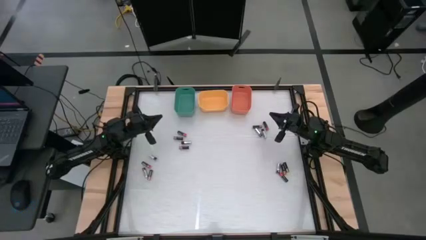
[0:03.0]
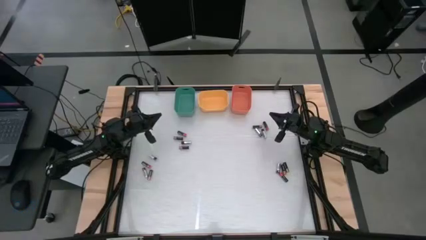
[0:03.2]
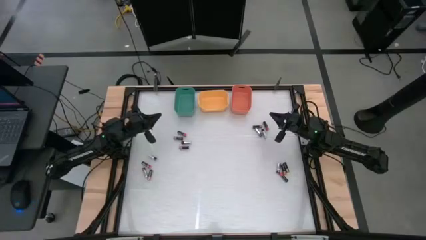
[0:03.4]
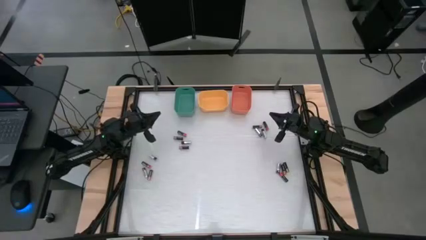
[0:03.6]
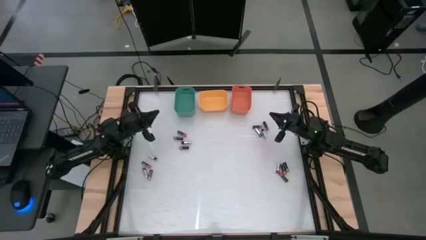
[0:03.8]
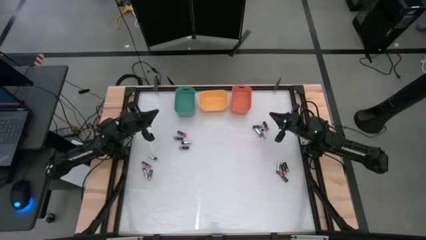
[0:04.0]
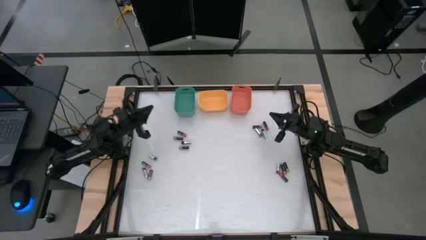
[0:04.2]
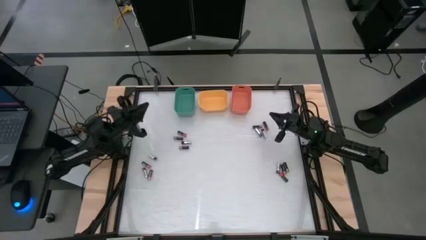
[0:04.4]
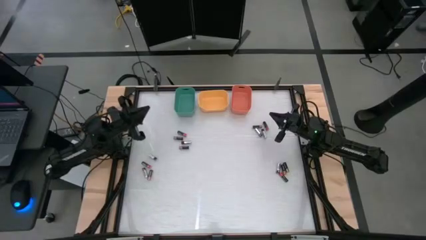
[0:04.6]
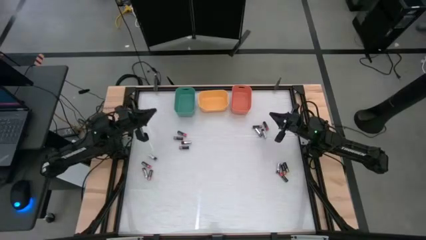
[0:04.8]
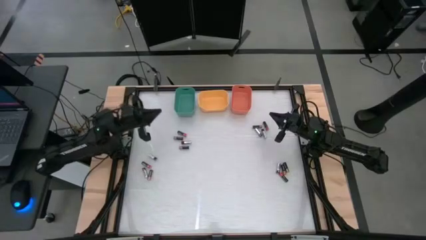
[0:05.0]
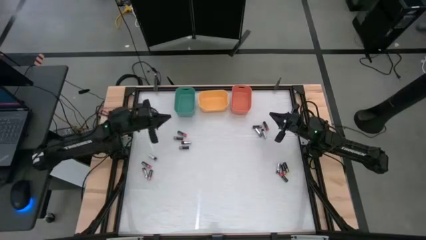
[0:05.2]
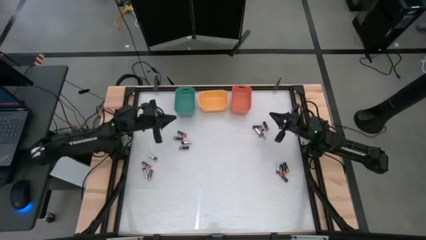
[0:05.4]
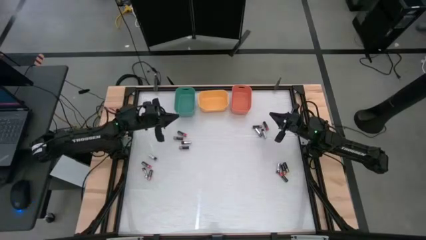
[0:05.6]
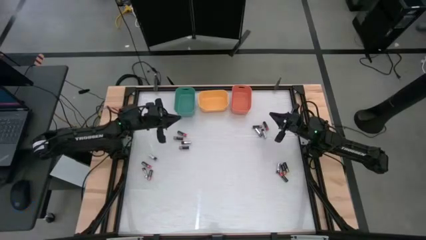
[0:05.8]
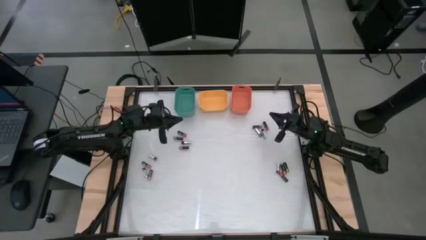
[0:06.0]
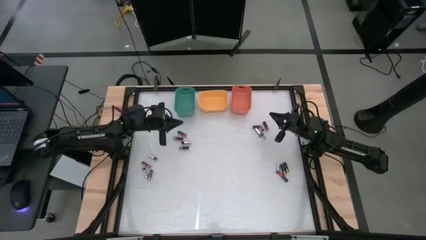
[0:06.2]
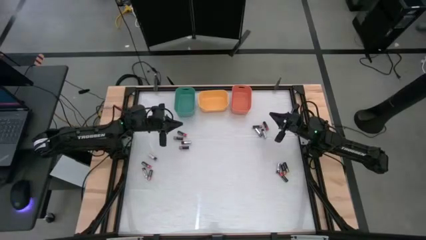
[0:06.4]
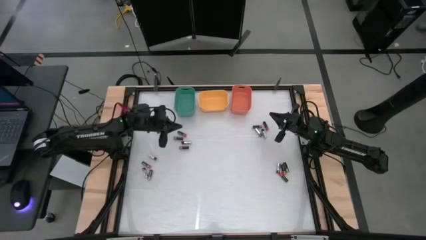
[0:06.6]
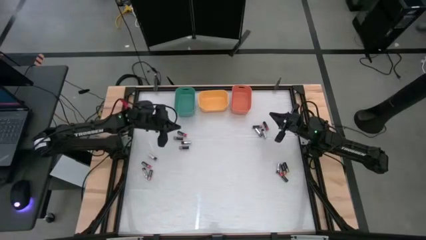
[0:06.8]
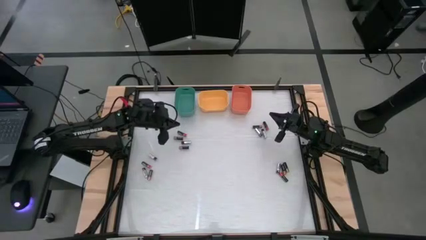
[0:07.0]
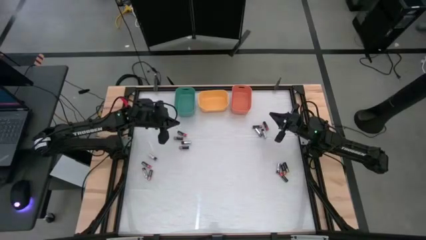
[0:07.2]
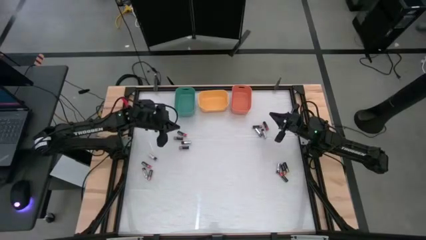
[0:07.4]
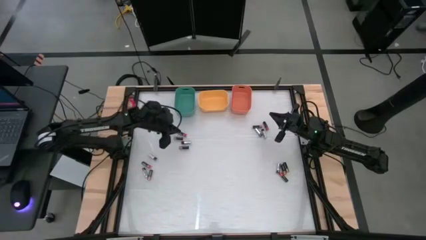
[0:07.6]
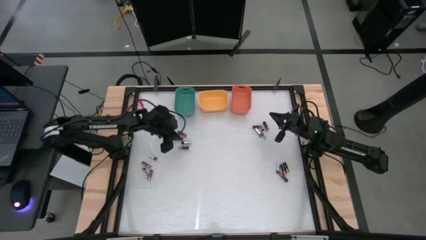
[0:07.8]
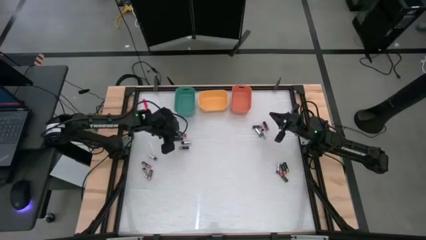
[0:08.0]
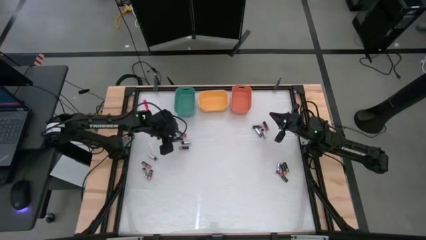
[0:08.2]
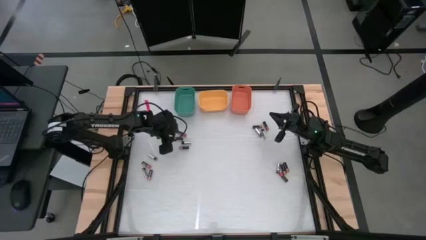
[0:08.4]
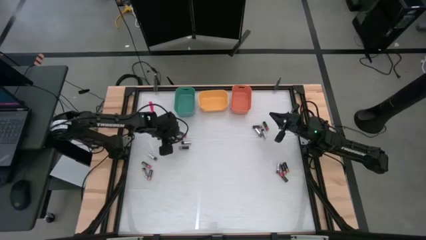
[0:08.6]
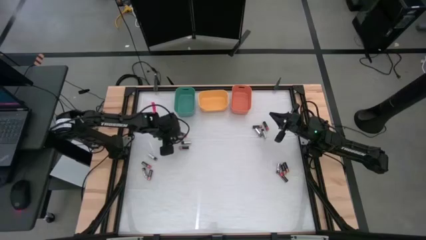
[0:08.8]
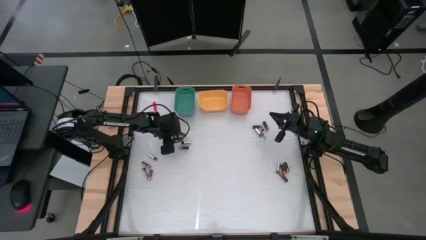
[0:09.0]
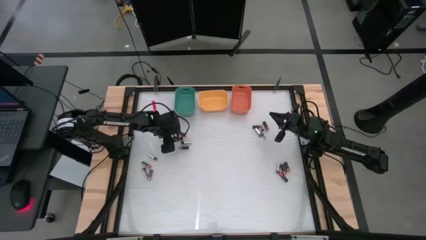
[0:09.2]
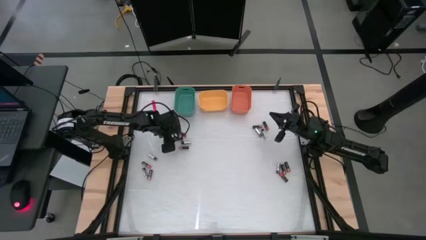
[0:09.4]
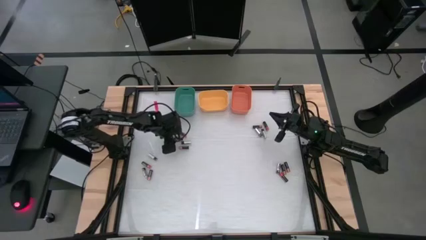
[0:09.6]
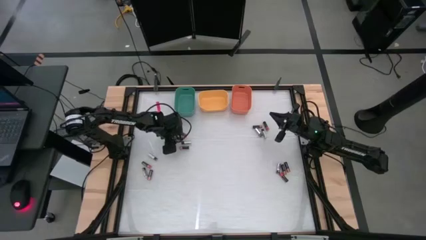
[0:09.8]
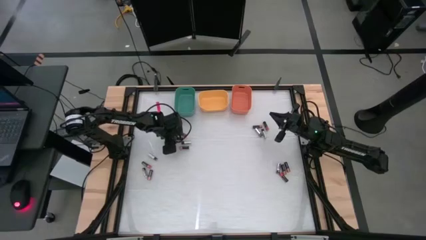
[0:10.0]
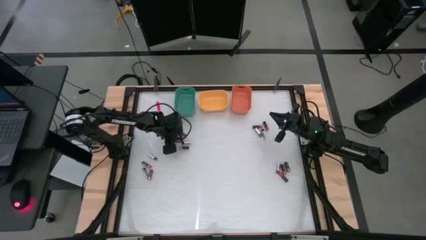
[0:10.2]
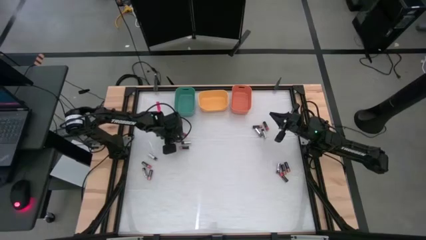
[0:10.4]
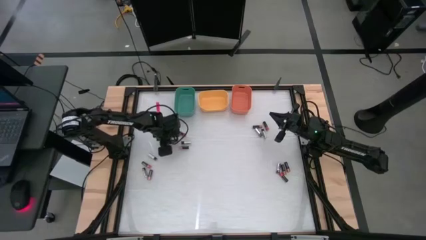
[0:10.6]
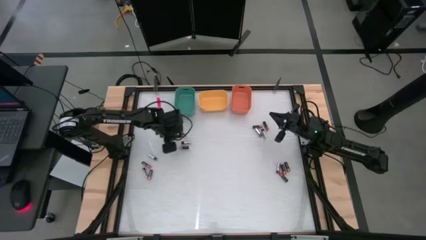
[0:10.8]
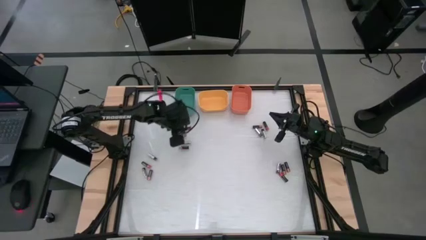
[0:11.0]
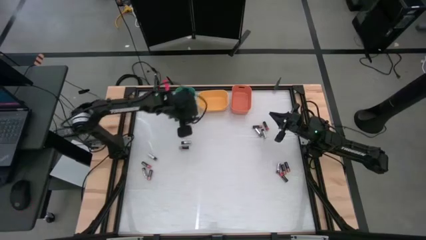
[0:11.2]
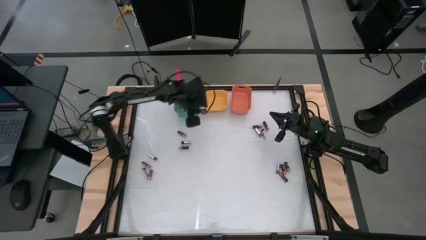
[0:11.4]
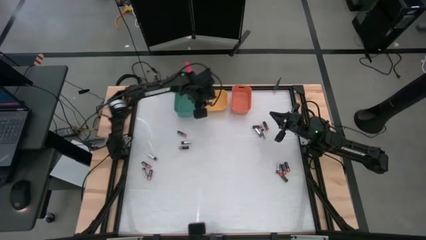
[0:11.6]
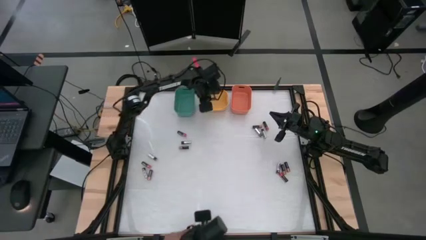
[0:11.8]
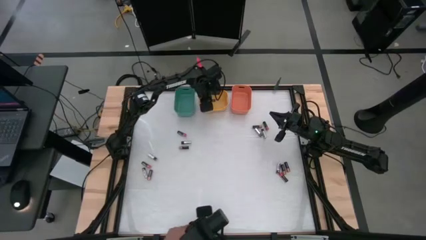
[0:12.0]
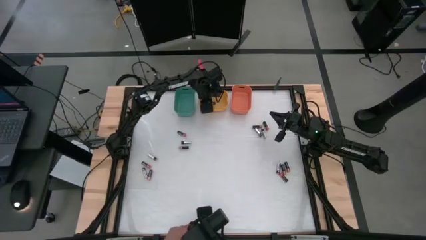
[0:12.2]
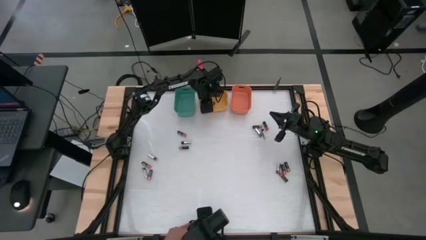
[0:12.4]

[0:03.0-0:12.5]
Task: Sort batteries
Put the brown battery into the yellow bin

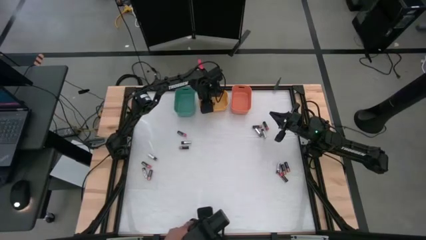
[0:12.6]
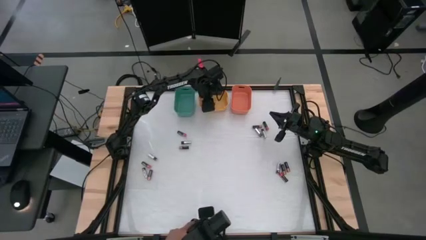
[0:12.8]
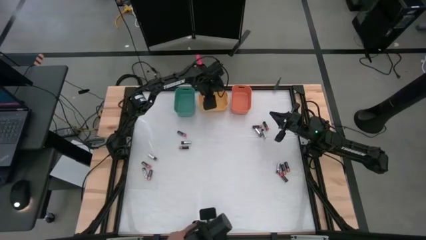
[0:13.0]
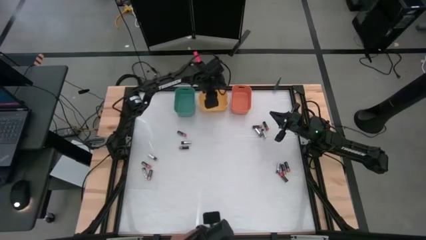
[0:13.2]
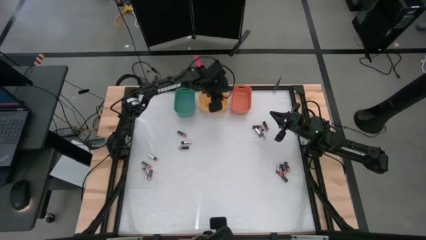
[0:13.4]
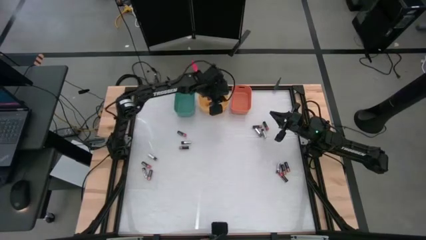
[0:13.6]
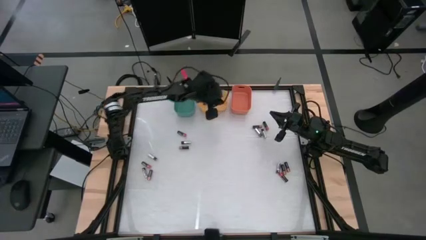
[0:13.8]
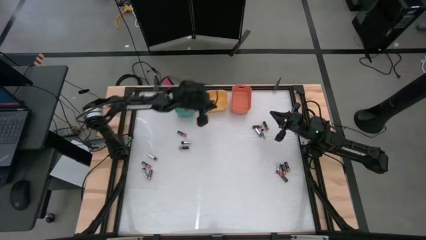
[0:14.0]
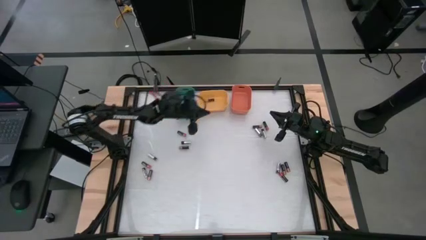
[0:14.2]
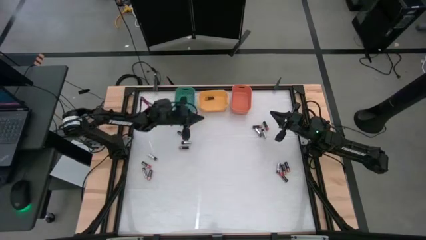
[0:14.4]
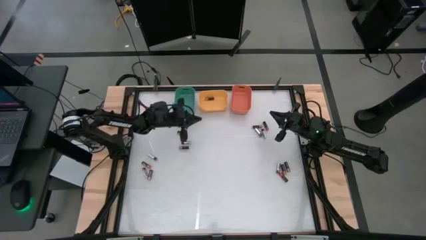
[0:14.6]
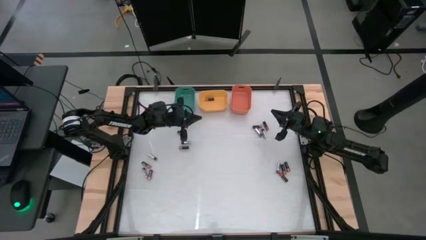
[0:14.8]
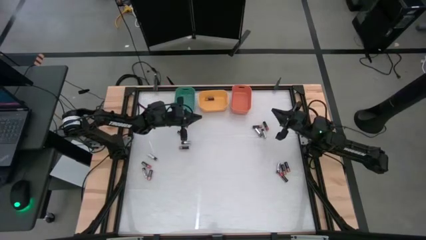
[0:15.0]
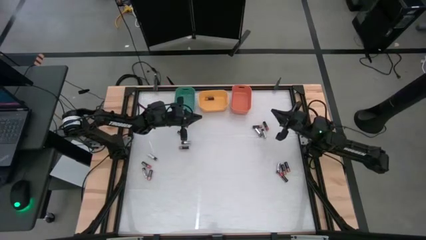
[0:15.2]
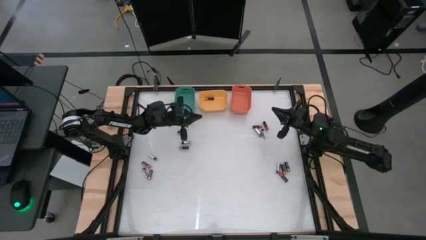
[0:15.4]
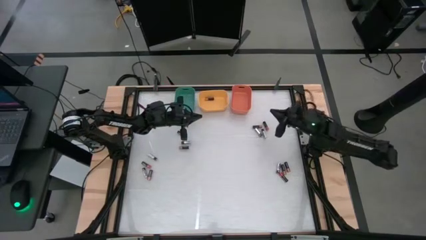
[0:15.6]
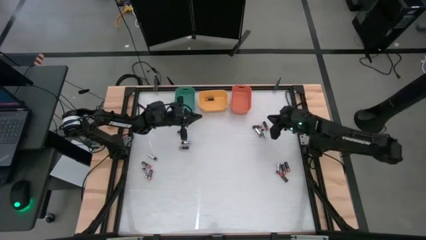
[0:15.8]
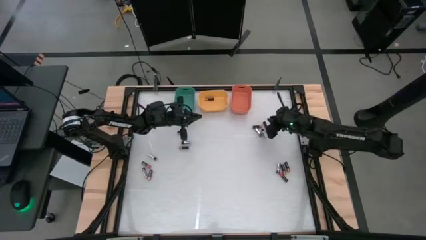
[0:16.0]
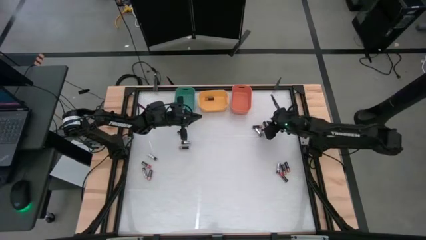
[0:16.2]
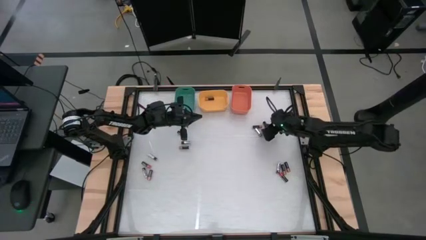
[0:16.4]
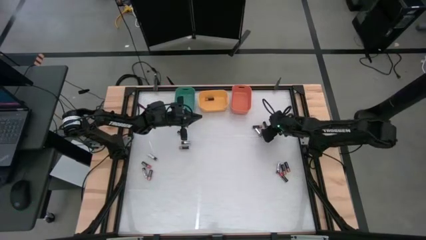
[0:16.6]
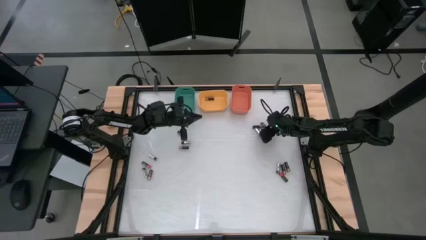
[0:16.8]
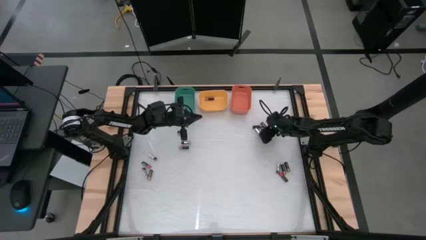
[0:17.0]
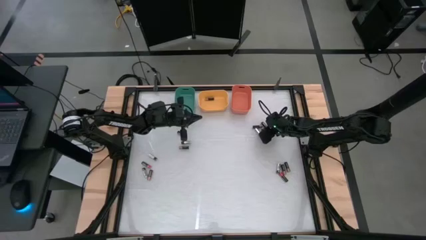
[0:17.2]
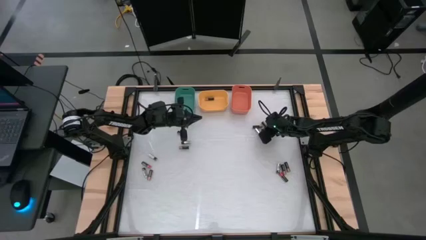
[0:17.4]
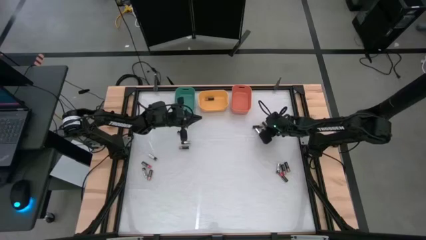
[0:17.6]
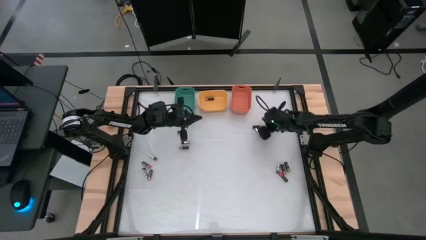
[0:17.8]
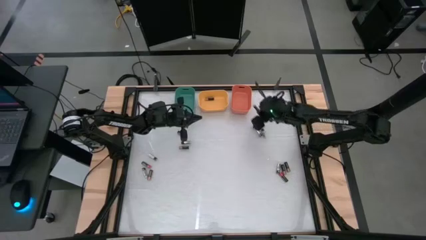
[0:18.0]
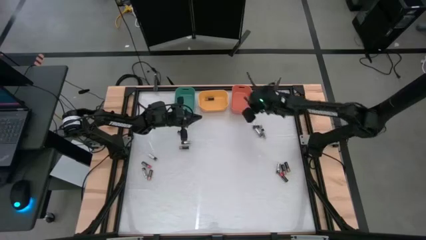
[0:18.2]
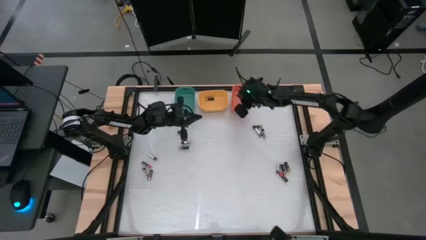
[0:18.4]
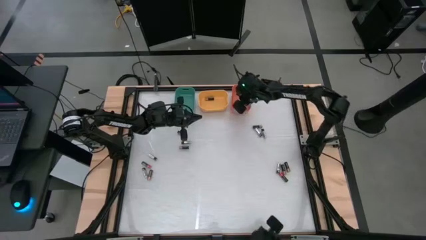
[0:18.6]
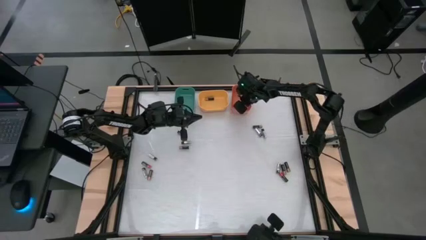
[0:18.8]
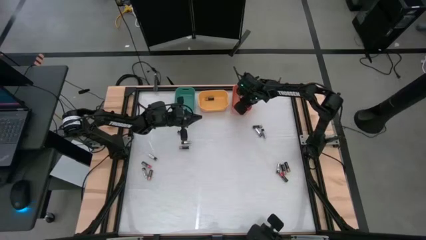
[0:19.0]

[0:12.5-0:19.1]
Put the red battery into the orange bin
